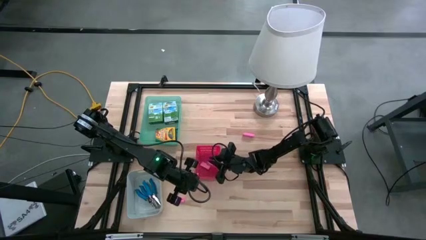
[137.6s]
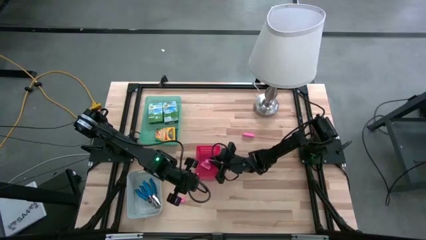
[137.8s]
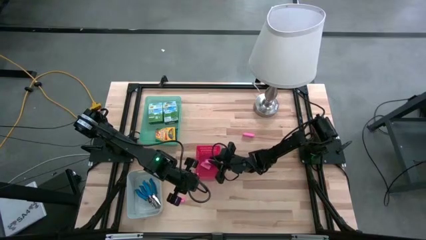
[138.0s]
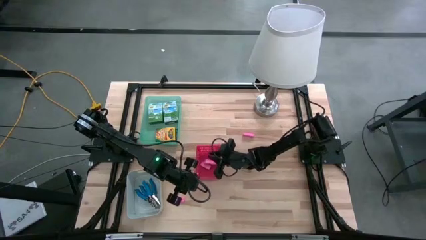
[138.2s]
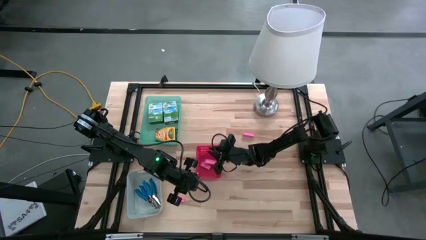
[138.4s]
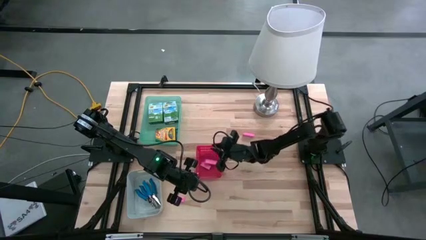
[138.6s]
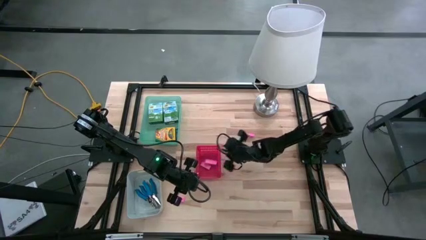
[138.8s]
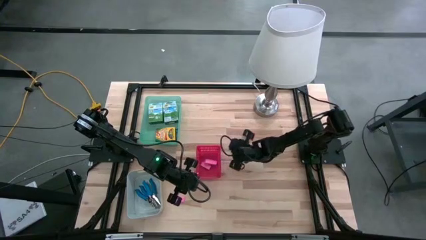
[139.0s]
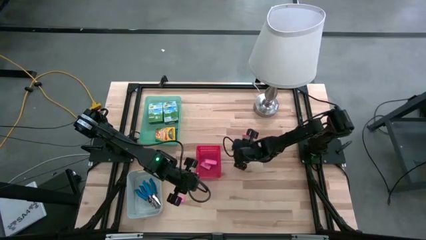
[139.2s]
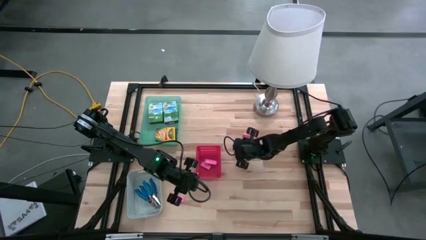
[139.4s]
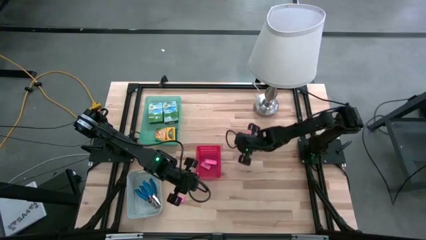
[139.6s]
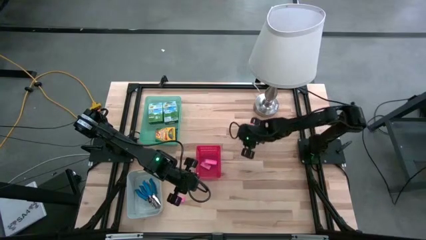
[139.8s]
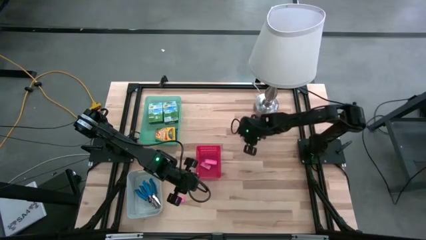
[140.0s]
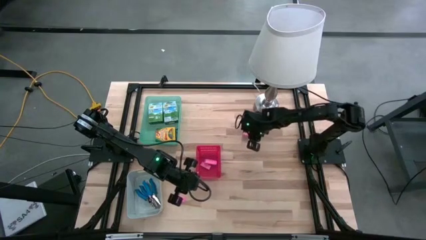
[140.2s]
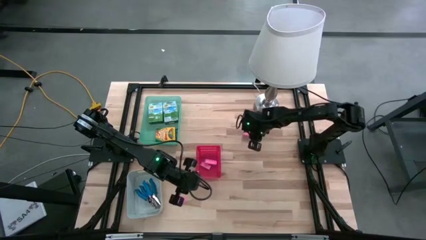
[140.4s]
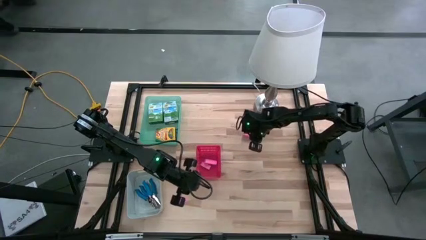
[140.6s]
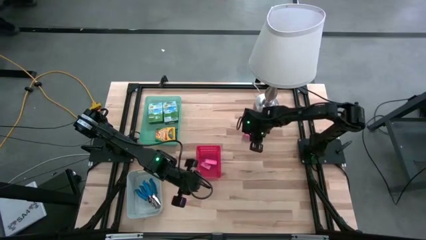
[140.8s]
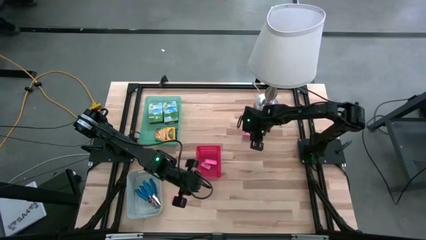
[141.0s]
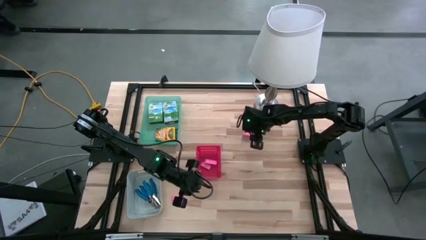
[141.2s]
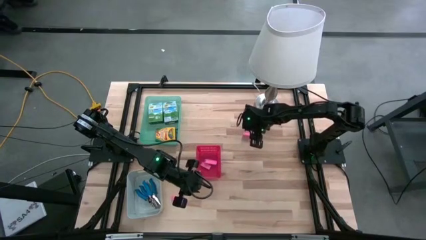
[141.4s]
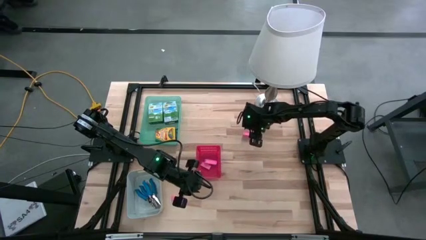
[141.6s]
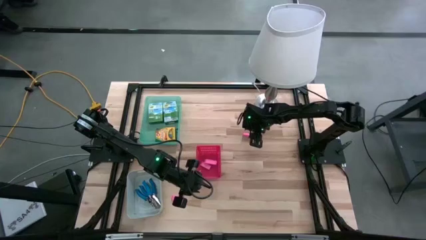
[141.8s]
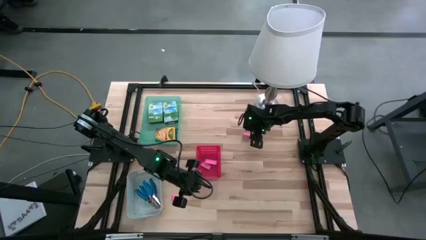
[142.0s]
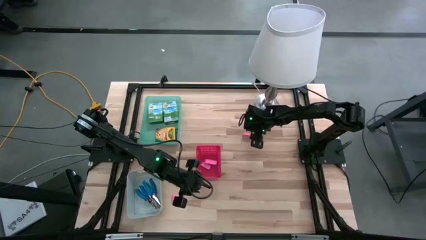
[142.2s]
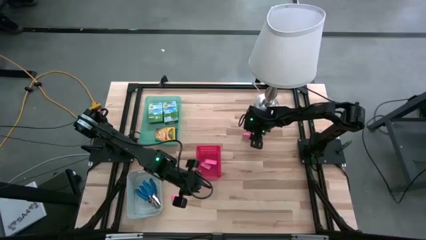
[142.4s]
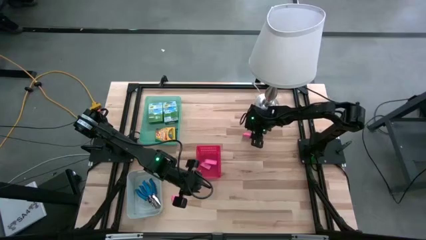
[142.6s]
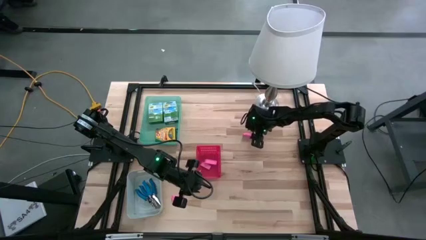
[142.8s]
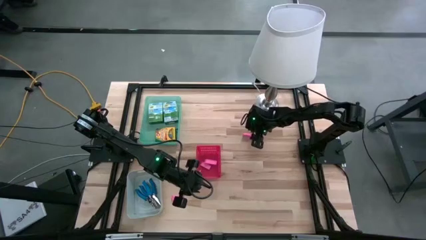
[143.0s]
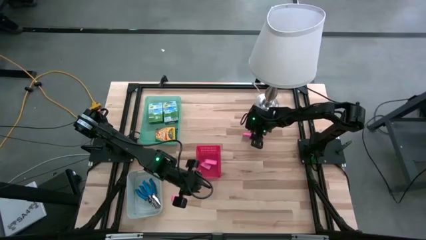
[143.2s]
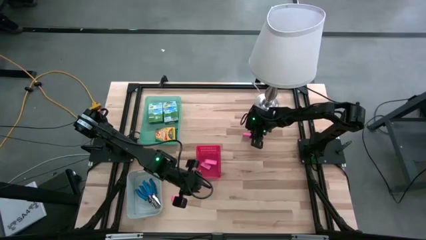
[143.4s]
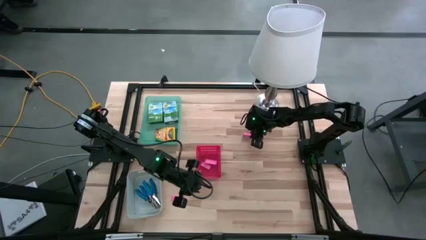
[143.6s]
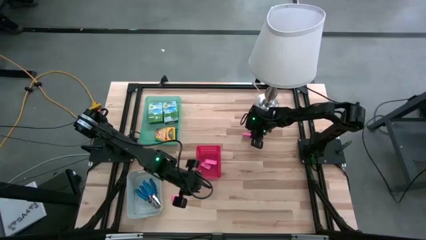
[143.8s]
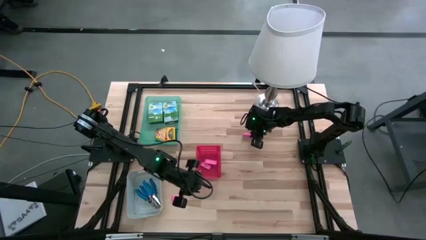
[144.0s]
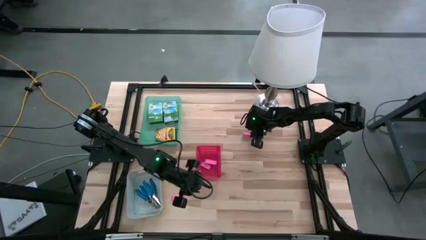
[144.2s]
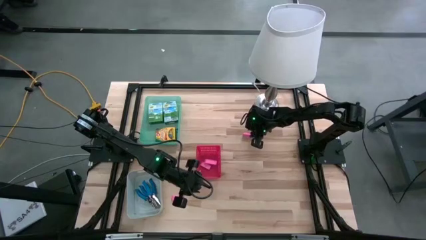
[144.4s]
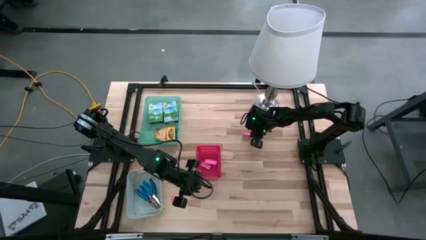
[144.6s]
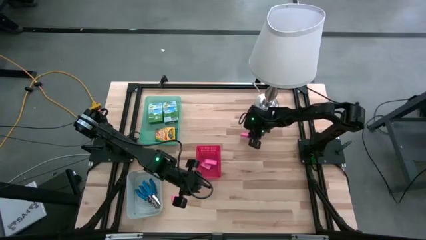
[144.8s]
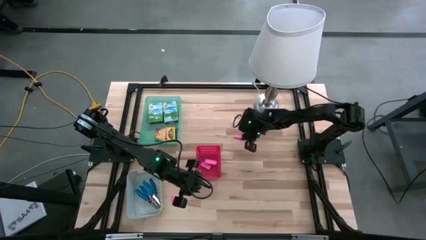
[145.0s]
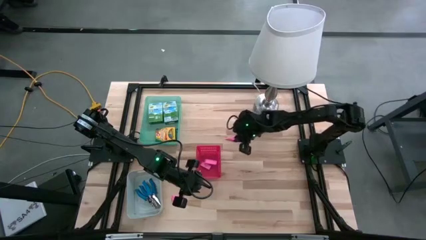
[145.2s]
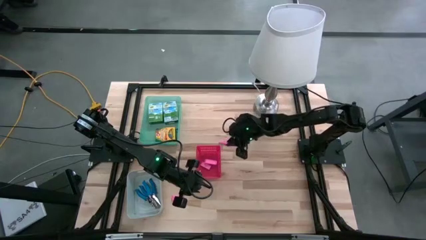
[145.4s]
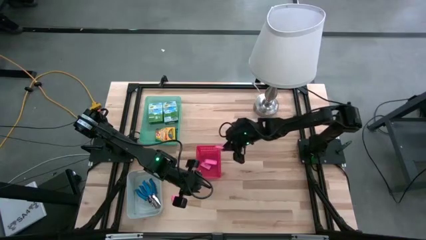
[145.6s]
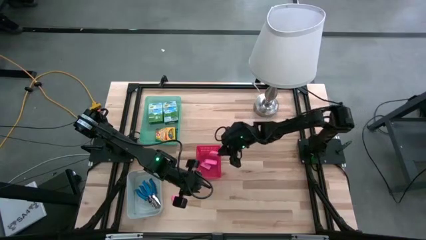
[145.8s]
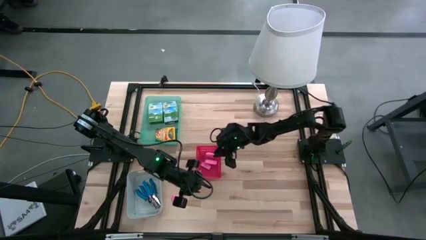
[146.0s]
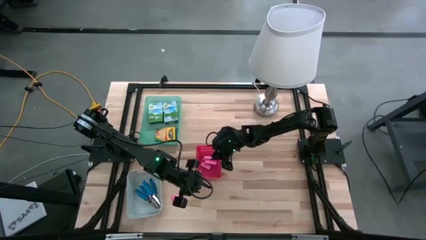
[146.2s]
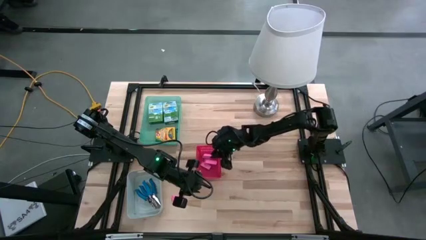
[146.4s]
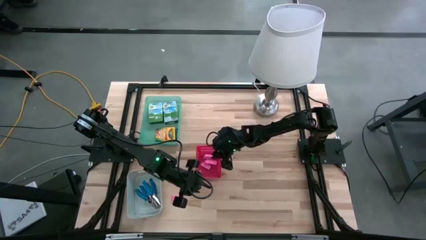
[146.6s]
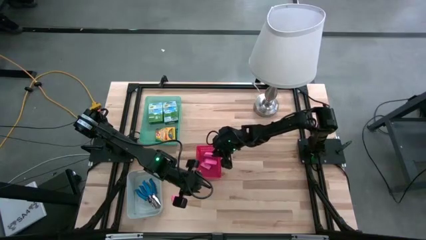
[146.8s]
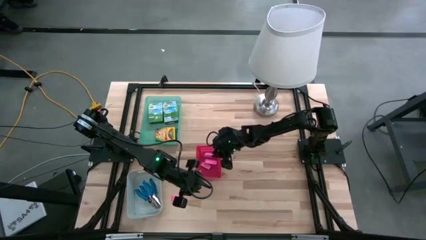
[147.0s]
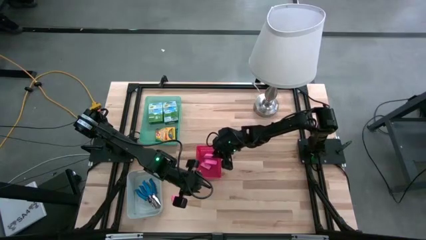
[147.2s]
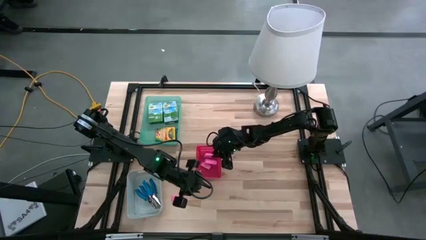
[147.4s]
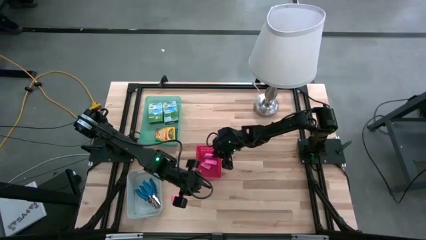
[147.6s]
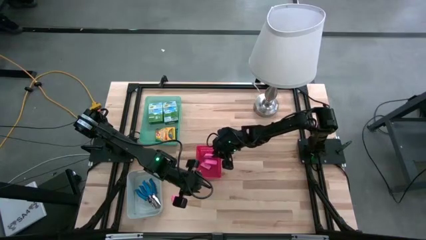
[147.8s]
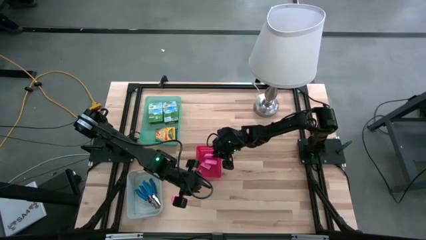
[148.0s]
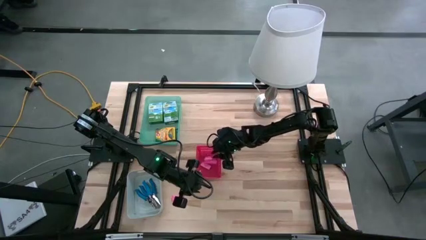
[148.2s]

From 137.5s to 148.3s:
Task: Pick & Place School Supplies
Put the pink eraser into the red bin

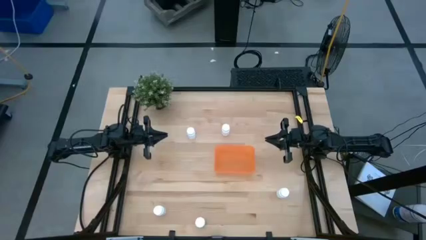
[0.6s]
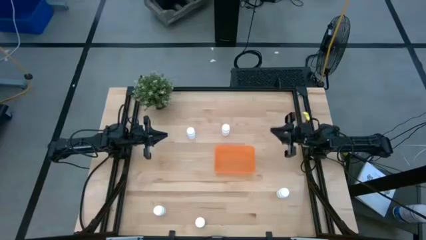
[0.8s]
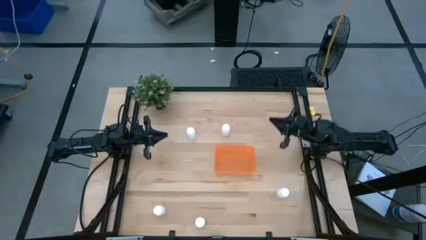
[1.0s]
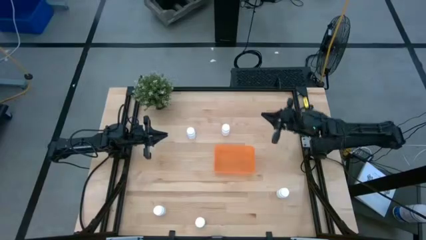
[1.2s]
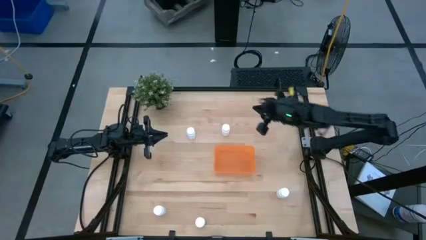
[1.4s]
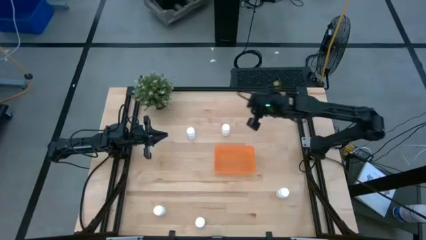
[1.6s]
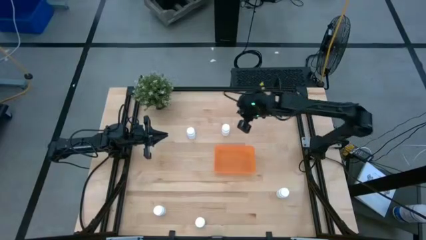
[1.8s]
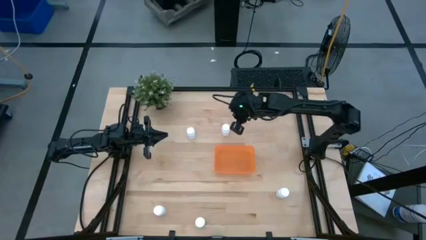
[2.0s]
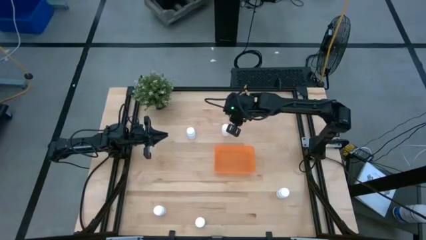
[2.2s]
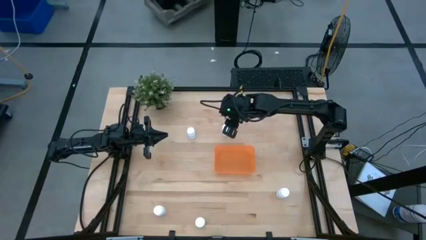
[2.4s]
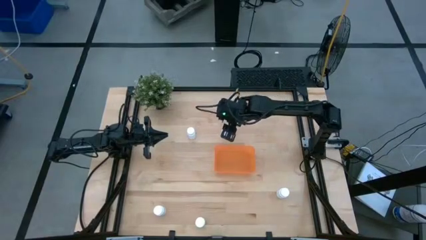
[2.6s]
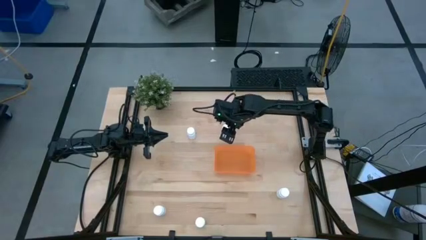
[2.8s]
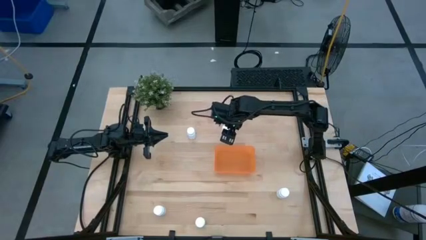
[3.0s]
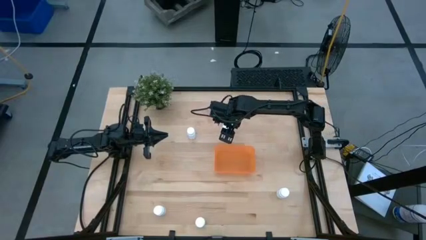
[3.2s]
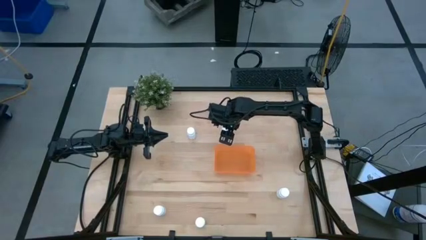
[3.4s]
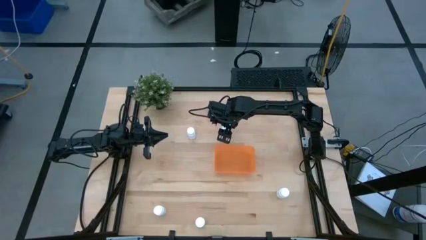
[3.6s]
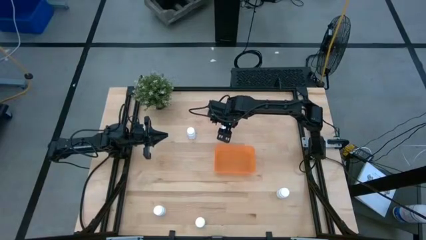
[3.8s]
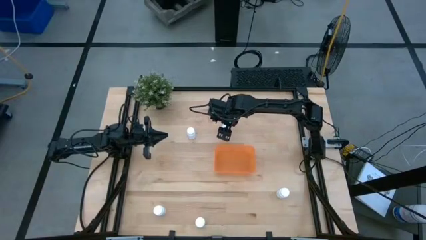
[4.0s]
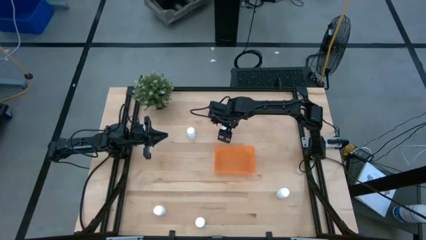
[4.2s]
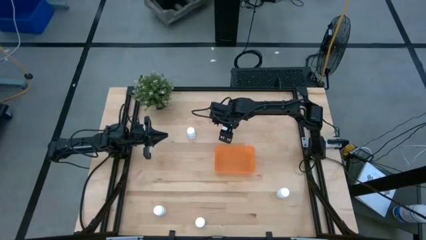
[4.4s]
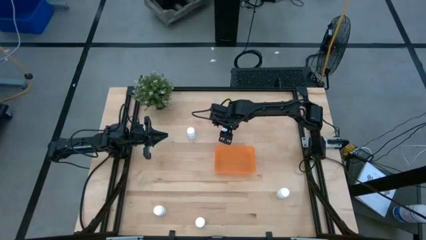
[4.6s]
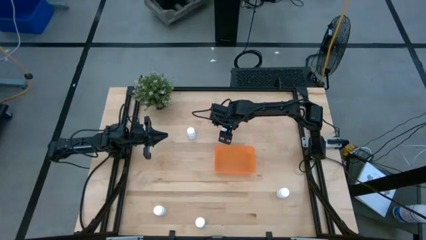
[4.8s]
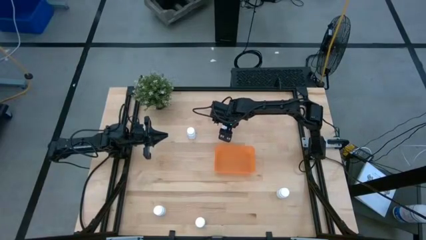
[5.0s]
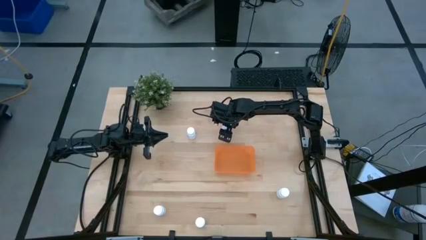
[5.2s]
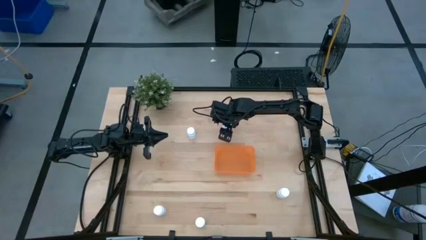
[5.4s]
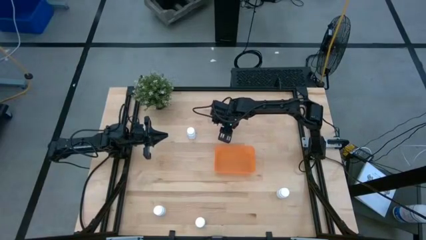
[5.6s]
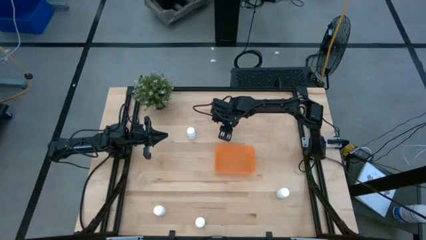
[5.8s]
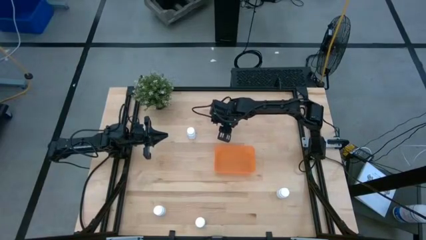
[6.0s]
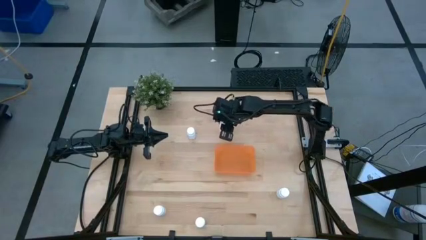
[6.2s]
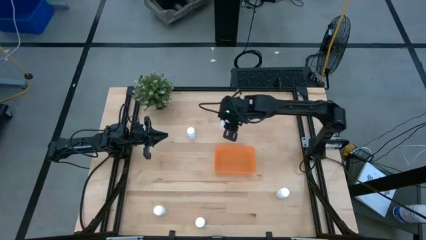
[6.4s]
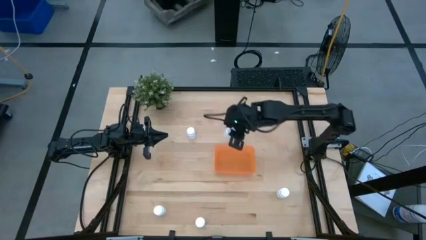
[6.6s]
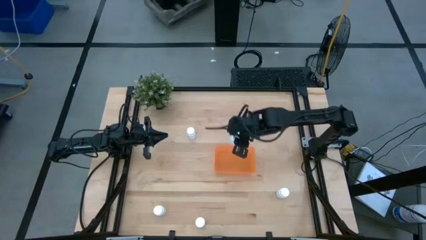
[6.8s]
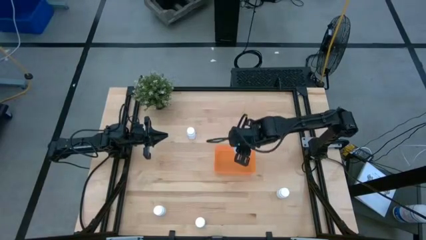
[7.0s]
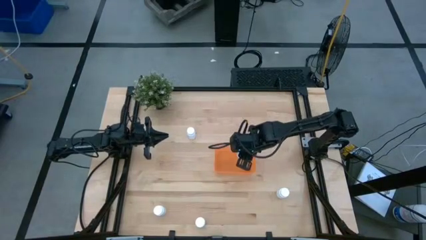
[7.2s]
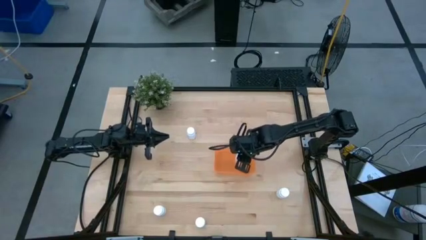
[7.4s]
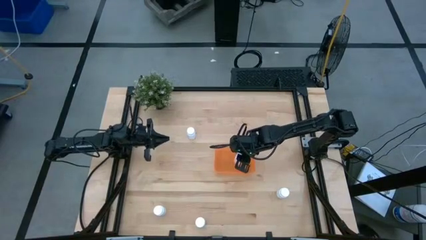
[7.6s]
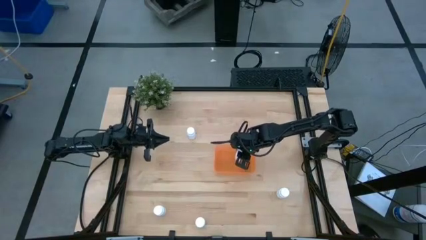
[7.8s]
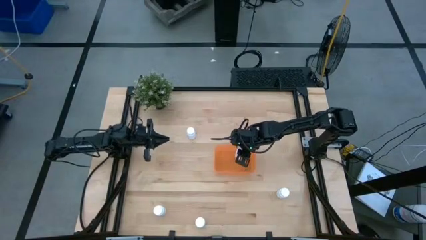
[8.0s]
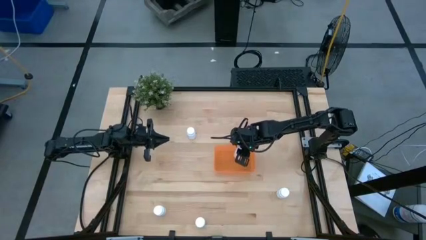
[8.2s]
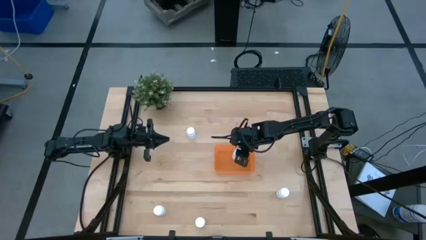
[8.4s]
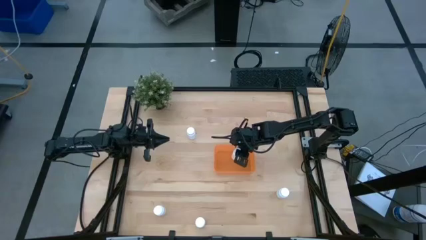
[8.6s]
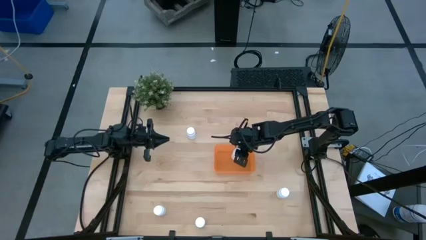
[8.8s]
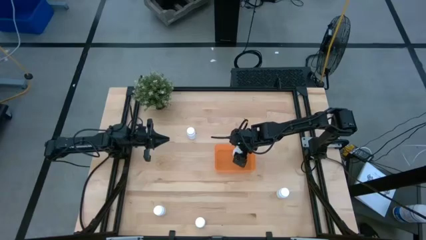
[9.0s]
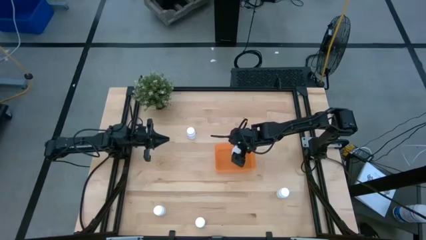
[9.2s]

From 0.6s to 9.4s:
Task: Pick and place pill bottles into a basket
Put the pill bottle into the bin
